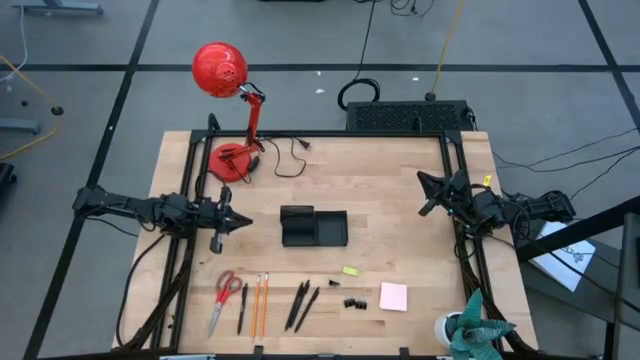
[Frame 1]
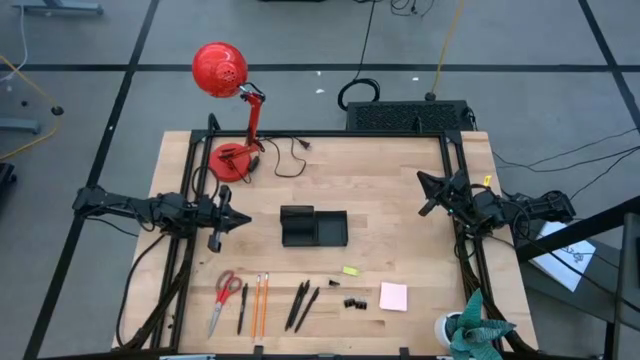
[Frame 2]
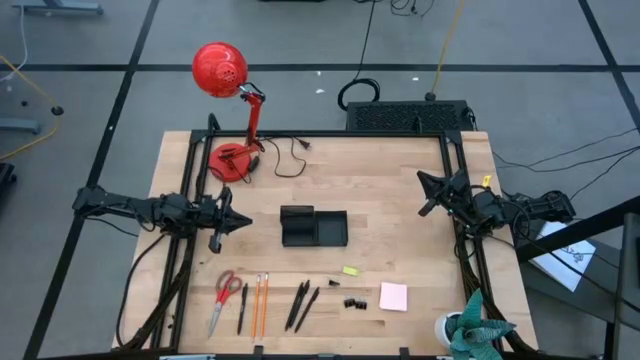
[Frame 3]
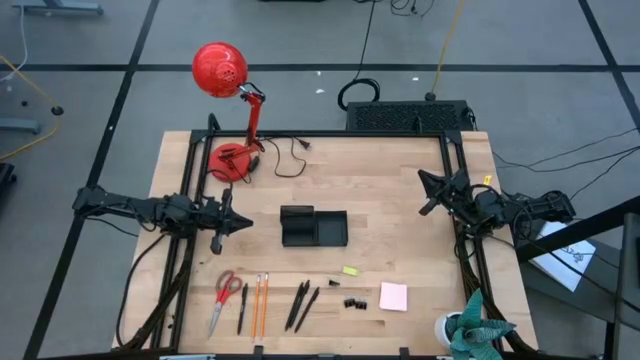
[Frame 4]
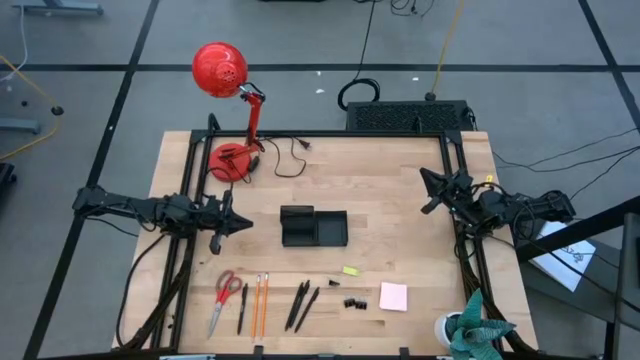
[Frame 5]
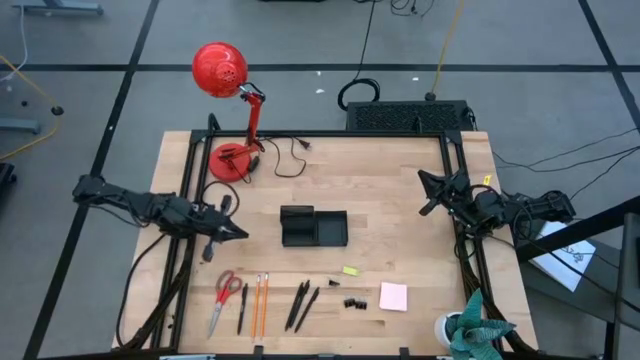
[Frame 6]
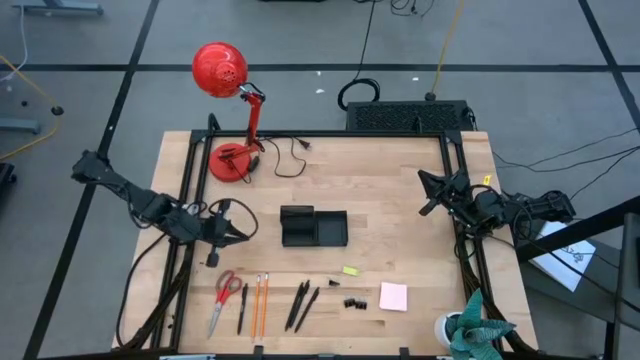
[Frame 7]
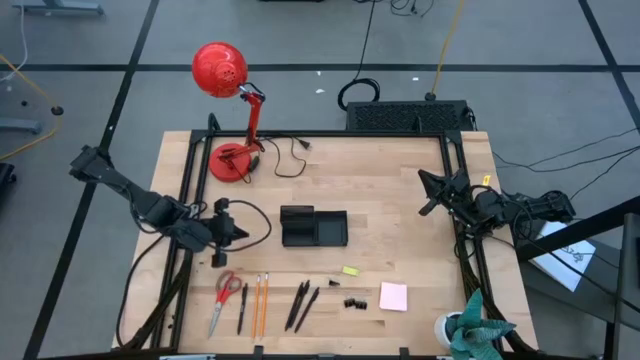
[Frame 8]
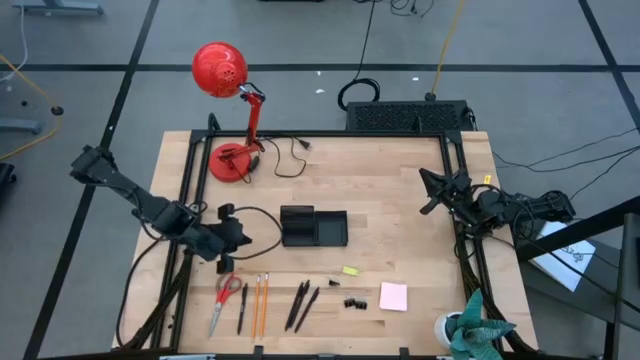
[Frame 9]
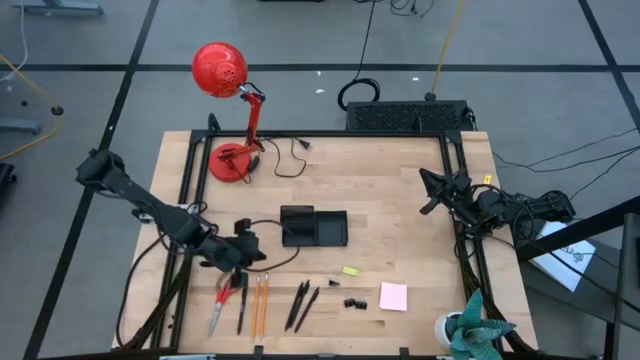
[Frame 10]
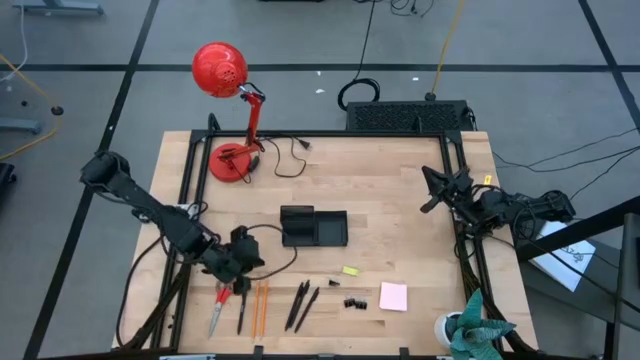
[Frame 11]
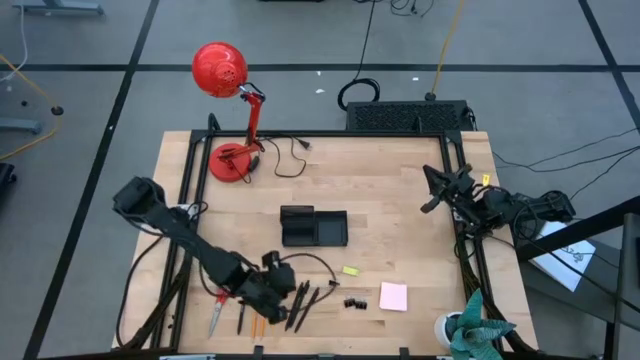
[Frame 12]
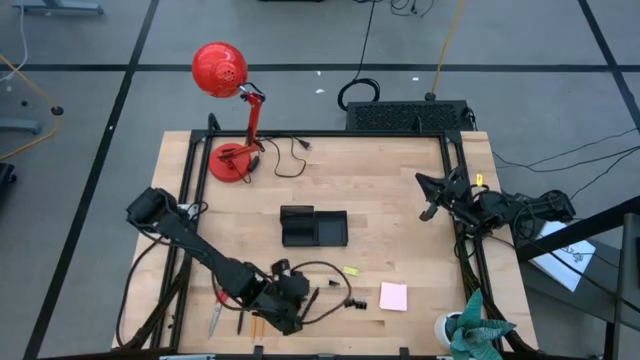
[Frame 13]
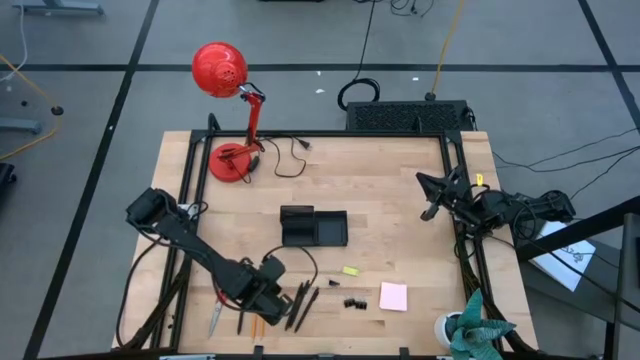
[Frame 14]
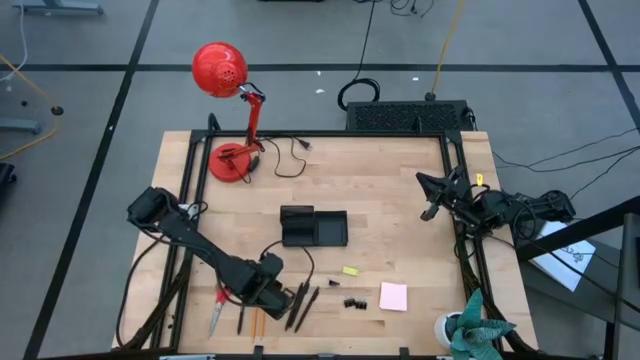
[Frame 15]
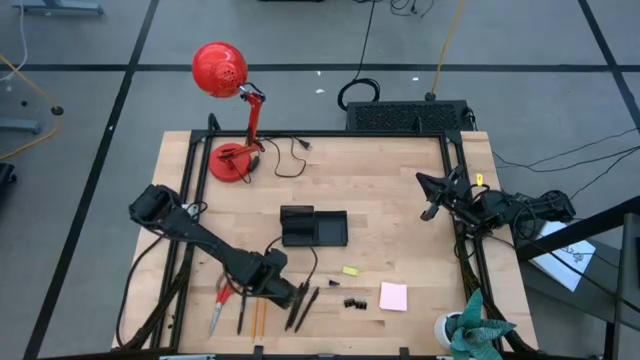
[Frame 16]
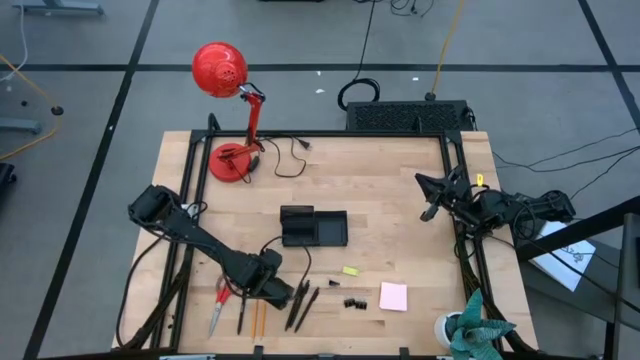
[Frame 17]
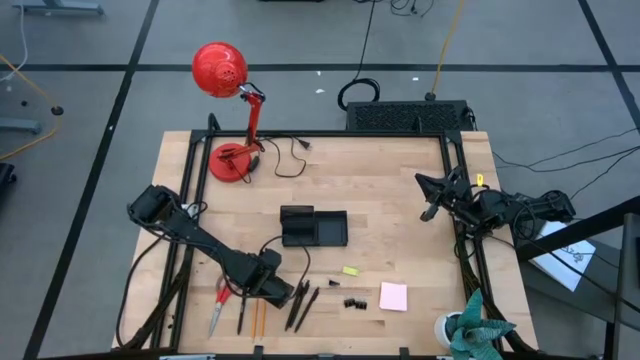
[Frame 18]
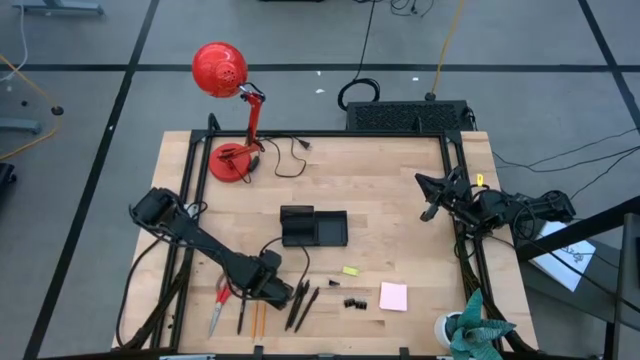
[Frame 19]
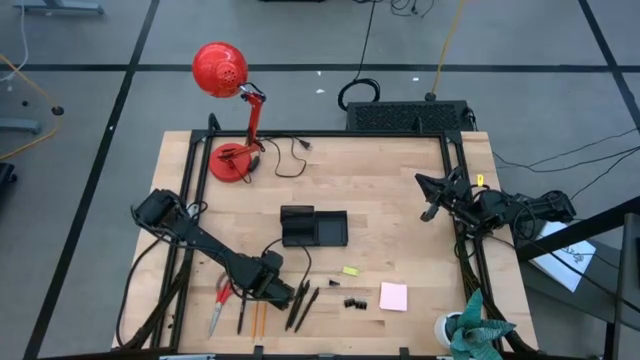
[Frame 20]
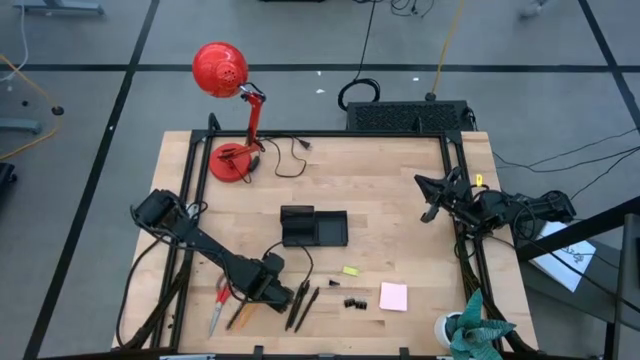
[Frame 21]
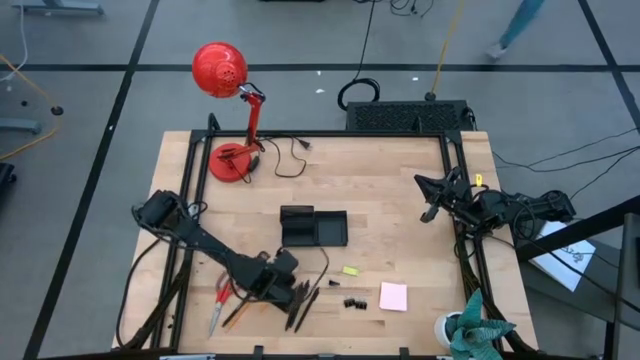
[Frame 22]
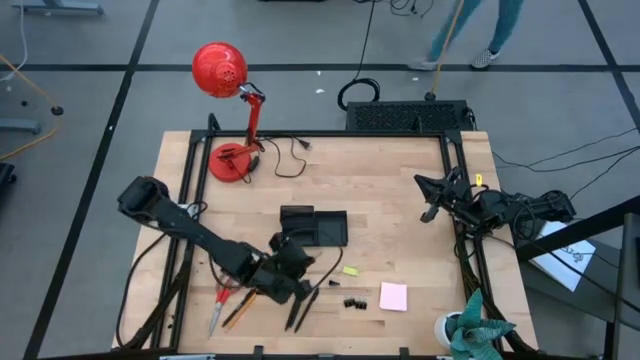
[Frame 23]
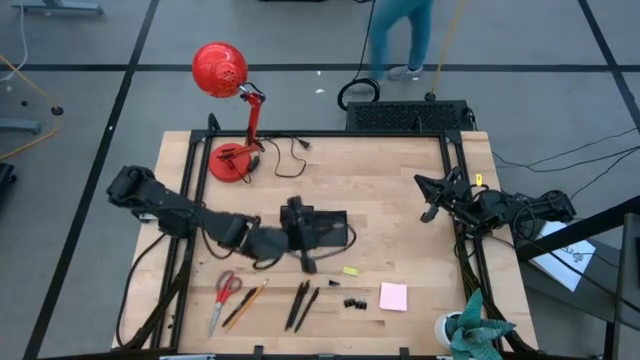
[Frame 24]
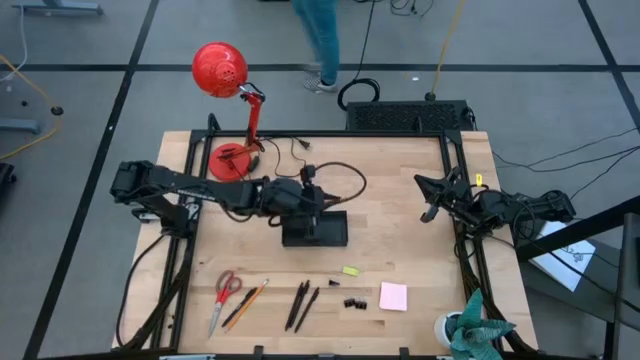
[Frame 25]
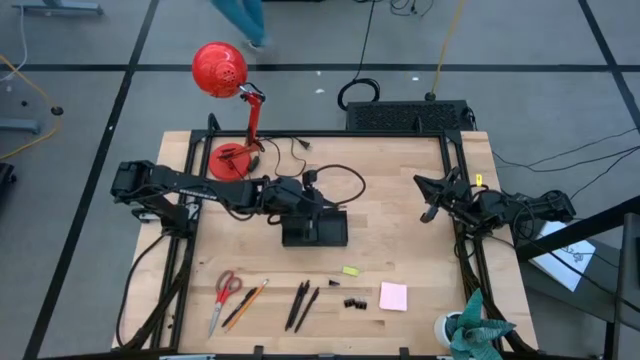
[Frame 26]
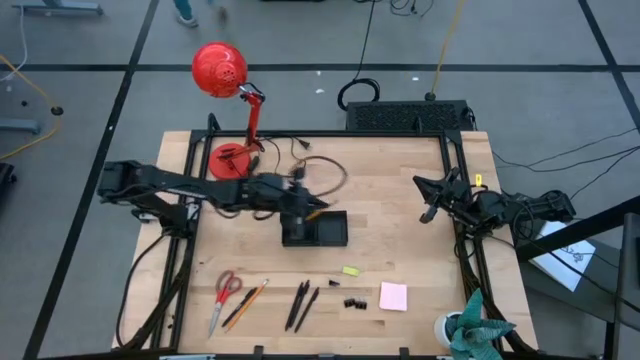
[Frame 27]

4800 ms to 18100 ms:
Task: Pick and place office supplies into organizer
Put the right pencil into the top left section of the desk organizer

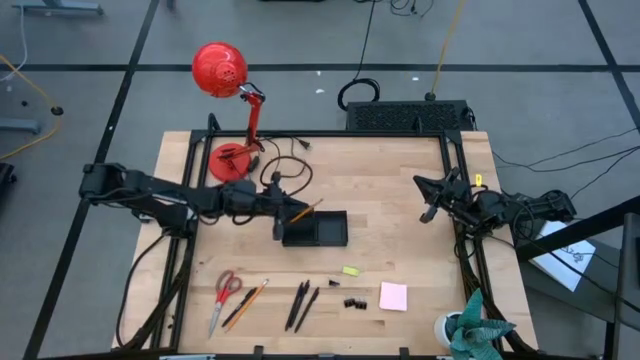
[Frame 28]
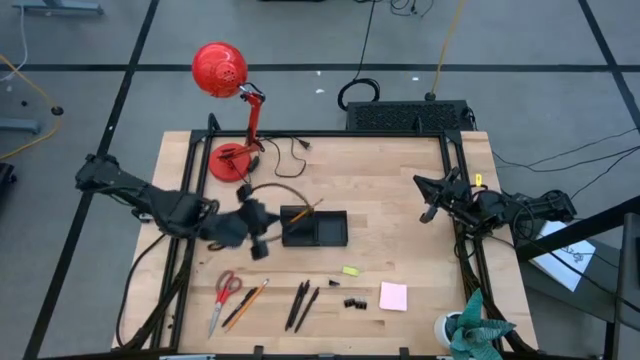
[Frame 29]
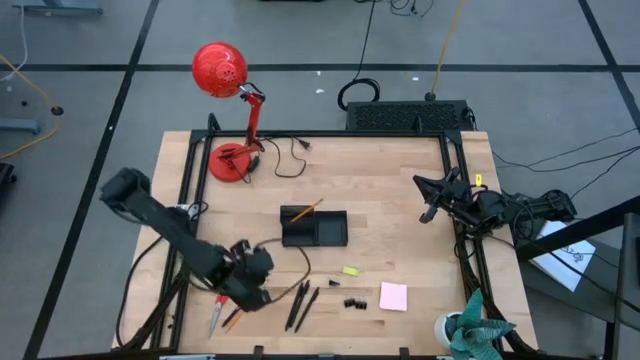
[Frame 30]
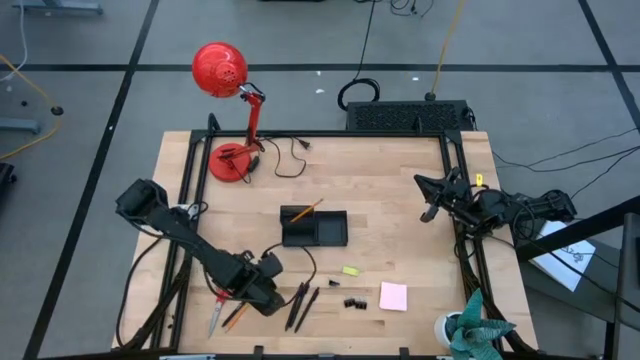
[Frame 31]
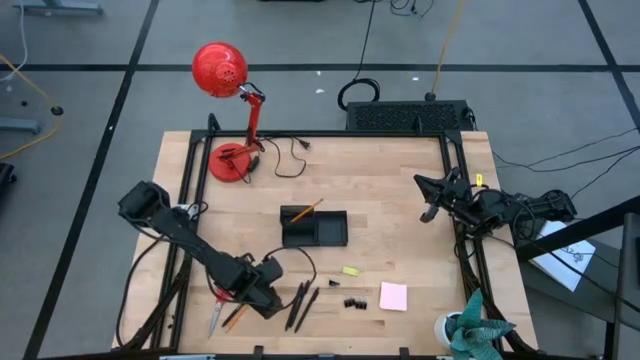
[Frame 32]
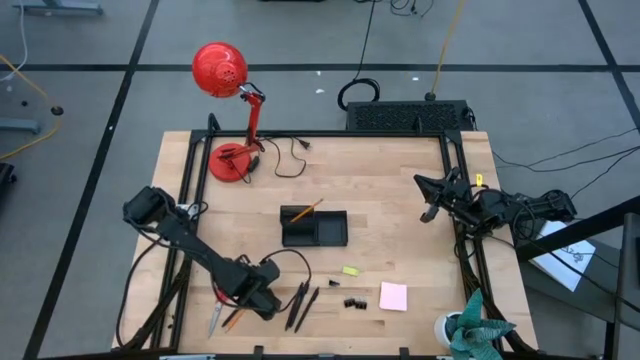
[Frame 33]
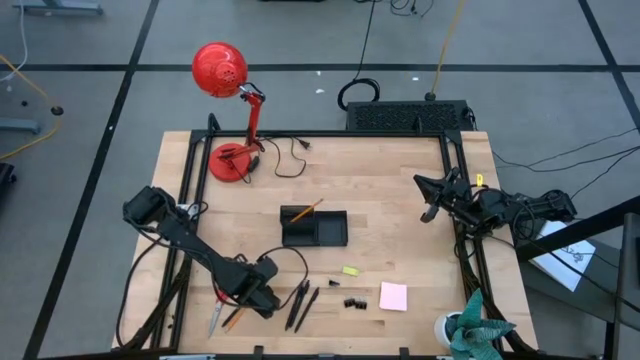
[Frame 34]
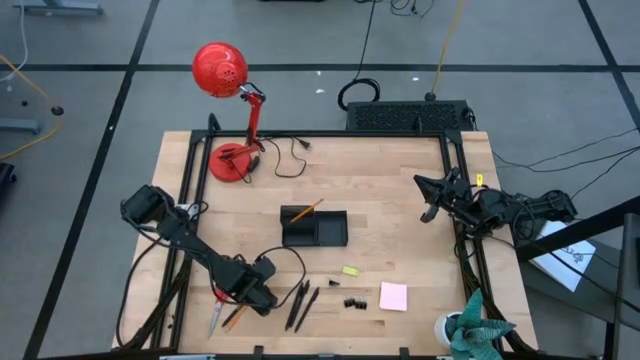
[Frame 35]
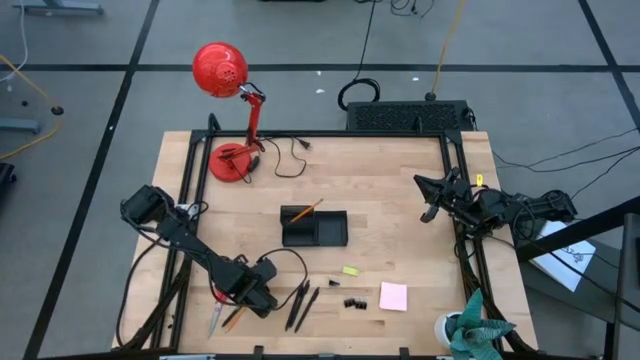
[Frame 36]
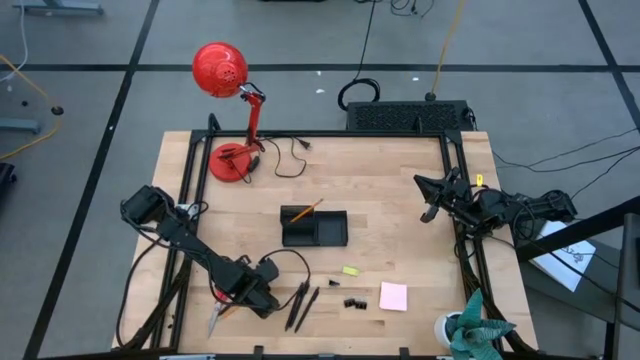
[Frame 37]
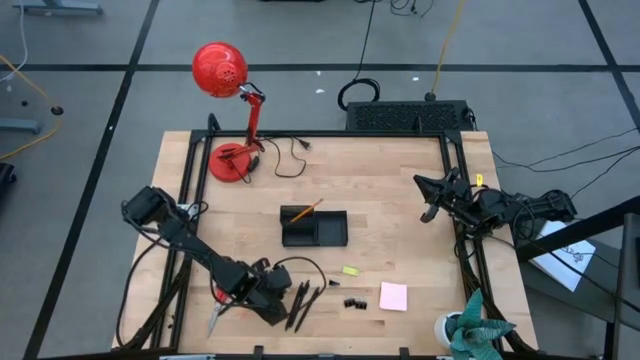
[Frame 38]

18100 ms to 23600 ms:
Put the pencil into the top left section of the desk organizer

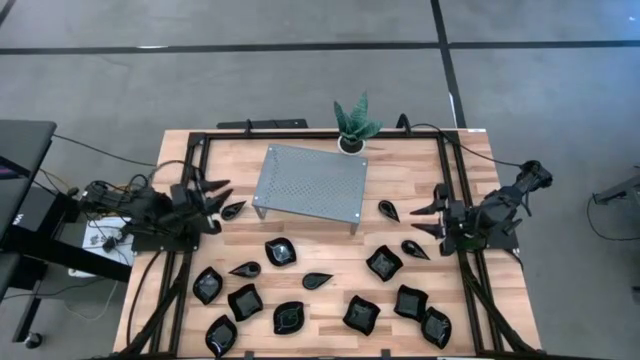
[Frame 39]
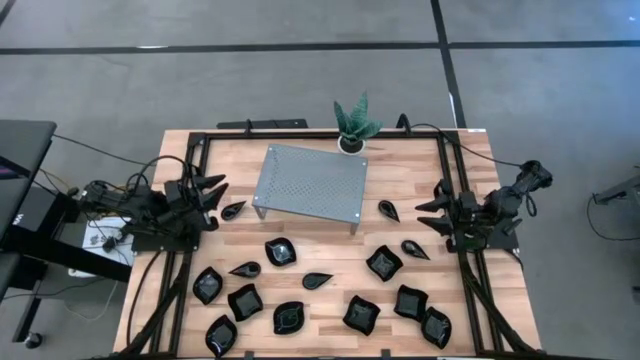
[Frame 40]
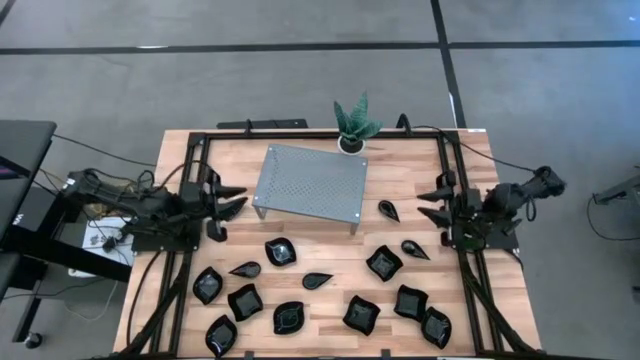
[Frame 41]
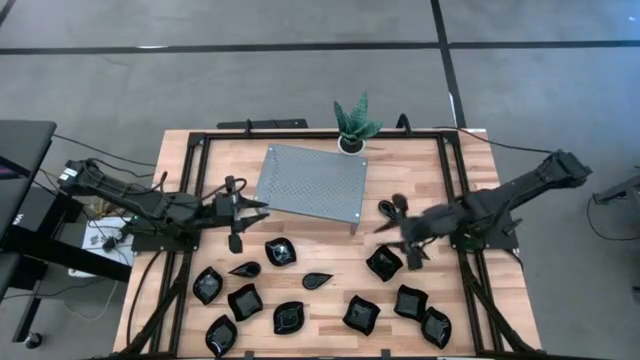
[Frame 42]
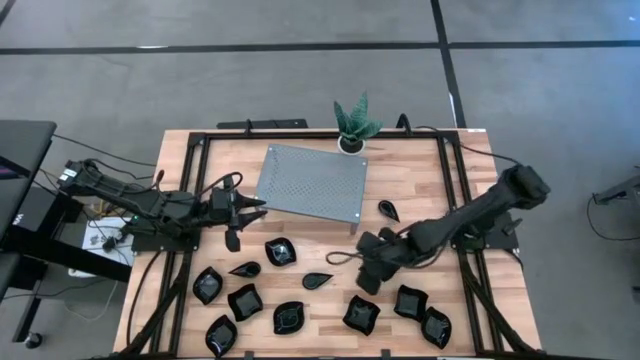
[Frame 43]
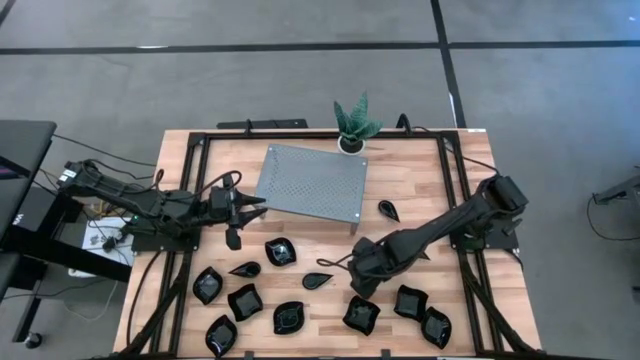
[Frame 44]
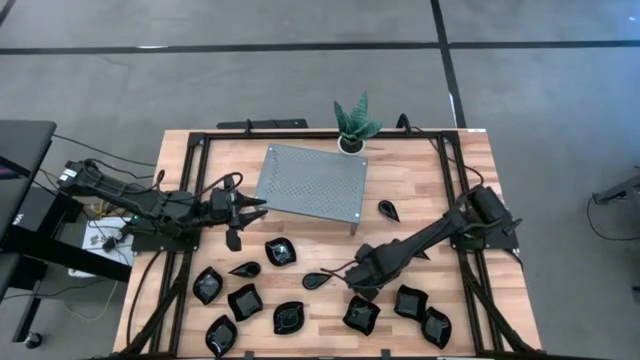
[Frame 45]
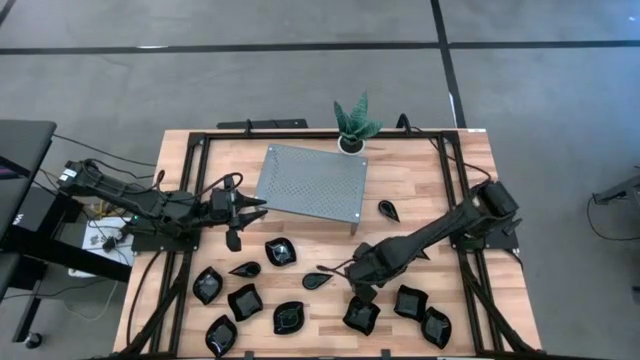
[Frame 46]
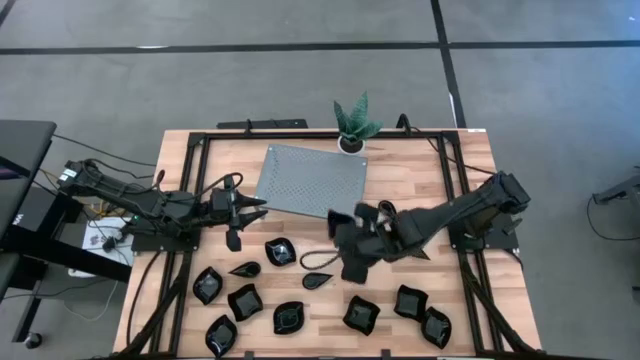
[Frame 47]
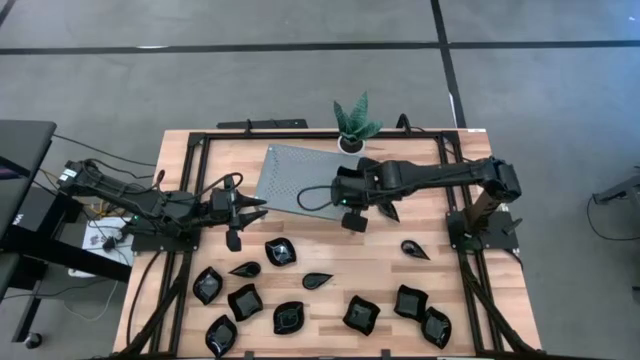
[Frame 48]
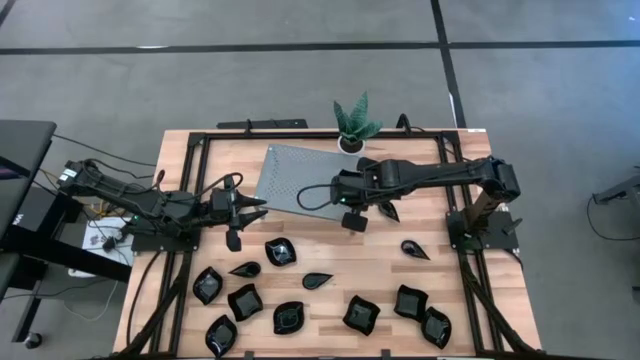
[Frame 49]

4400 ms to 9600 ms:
Task: Pick & Place Mini shaped plates
Put the distorted square plate on the shelf
